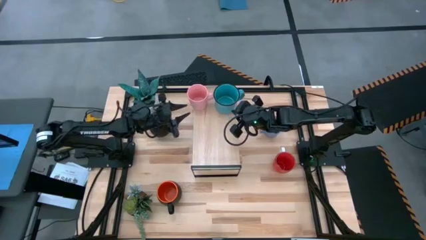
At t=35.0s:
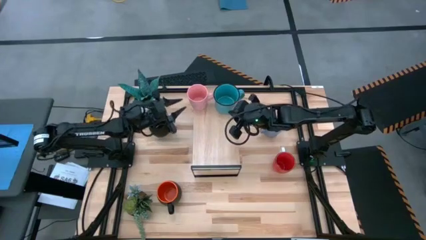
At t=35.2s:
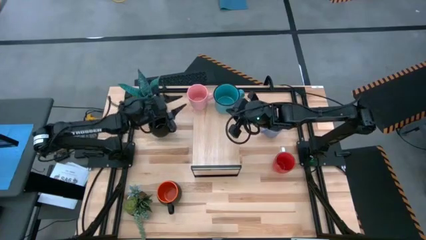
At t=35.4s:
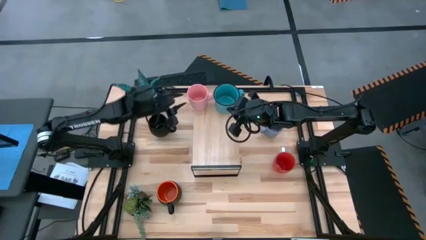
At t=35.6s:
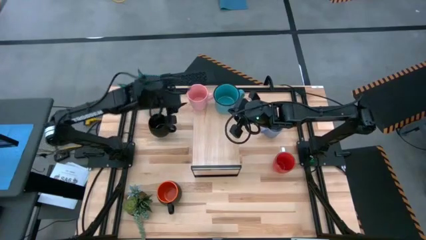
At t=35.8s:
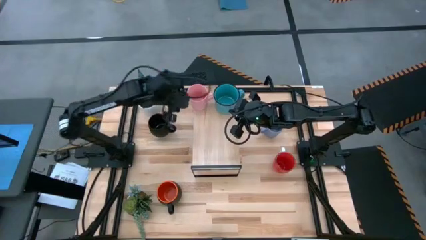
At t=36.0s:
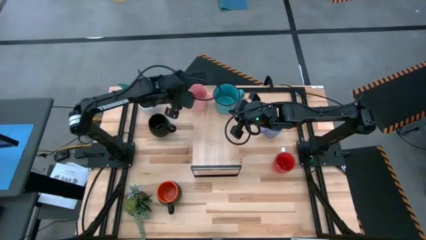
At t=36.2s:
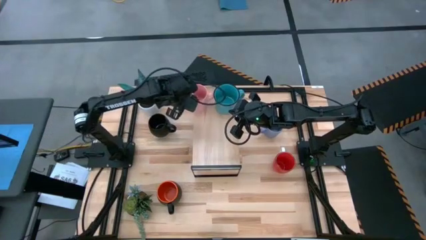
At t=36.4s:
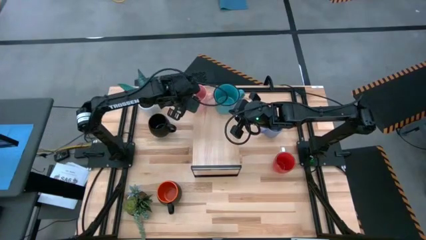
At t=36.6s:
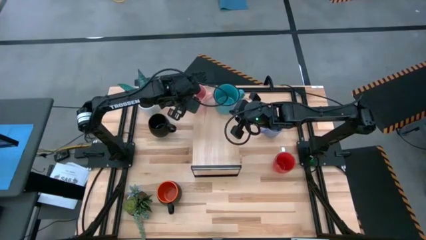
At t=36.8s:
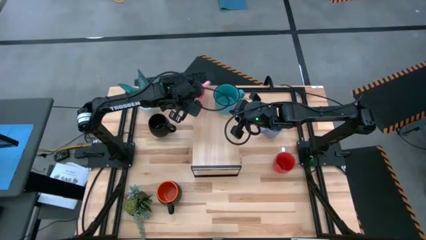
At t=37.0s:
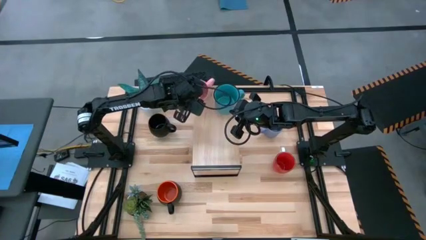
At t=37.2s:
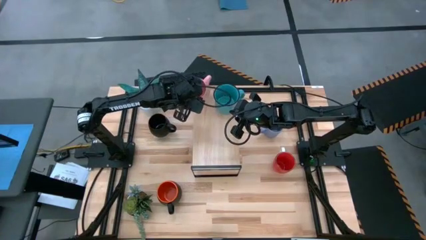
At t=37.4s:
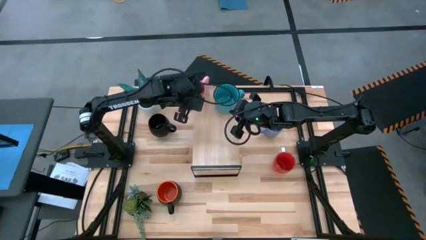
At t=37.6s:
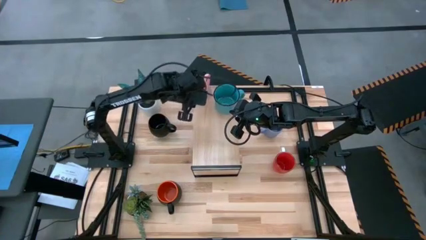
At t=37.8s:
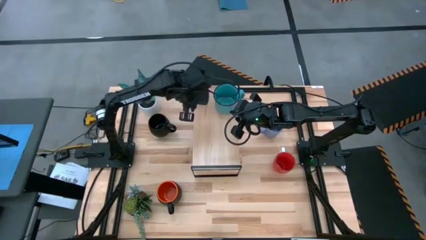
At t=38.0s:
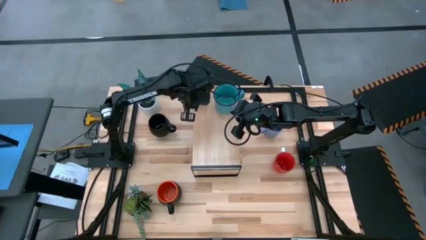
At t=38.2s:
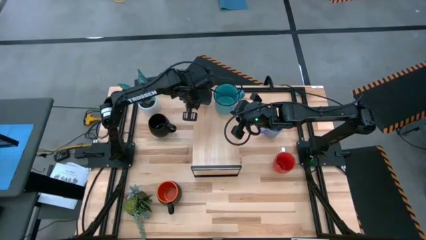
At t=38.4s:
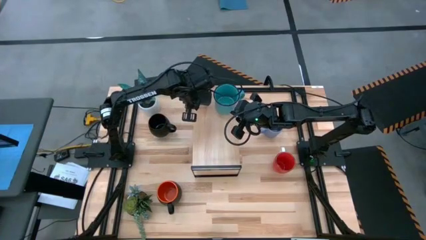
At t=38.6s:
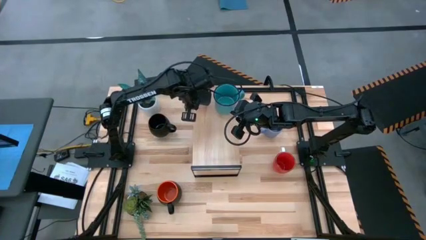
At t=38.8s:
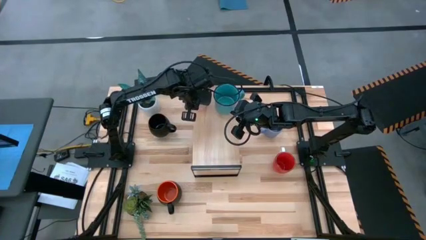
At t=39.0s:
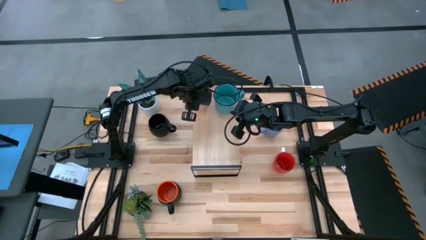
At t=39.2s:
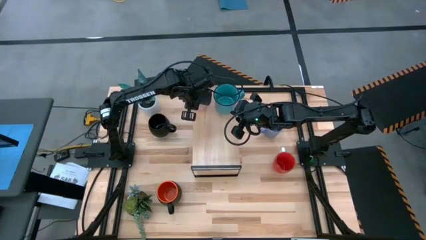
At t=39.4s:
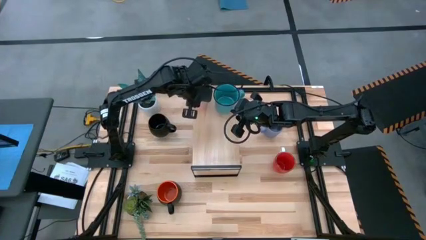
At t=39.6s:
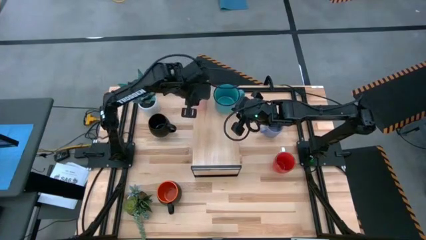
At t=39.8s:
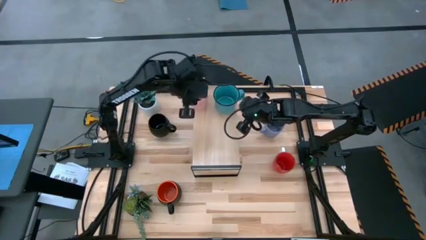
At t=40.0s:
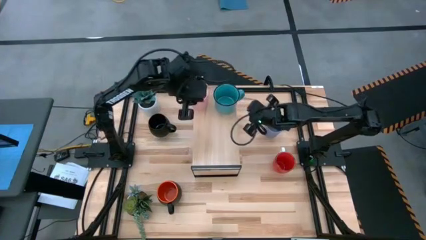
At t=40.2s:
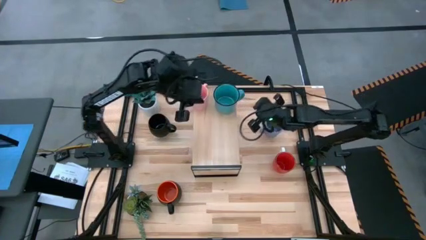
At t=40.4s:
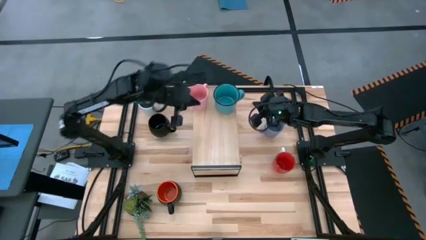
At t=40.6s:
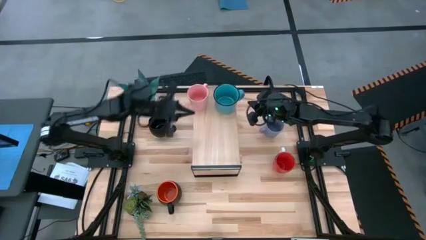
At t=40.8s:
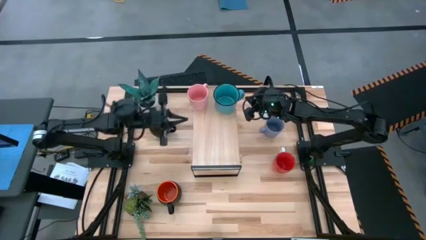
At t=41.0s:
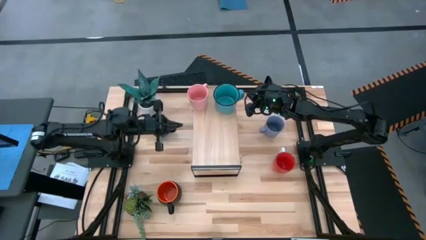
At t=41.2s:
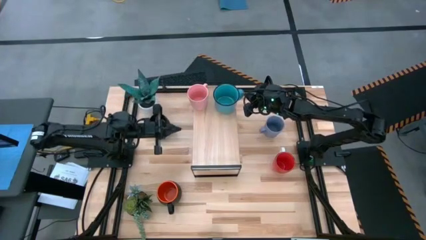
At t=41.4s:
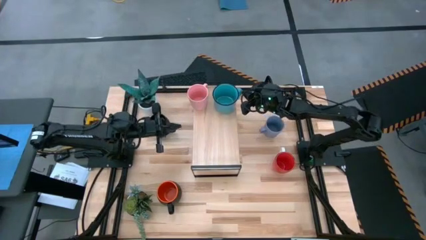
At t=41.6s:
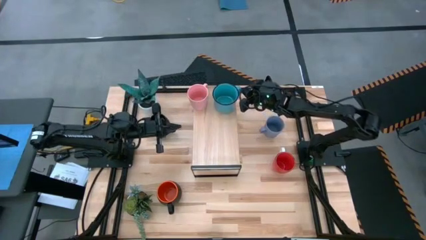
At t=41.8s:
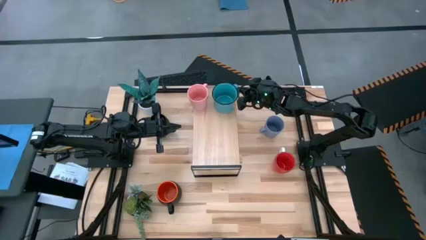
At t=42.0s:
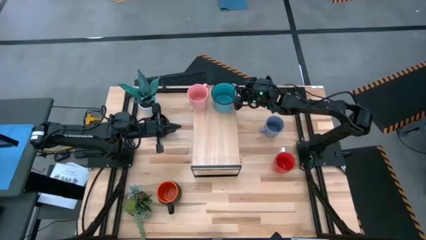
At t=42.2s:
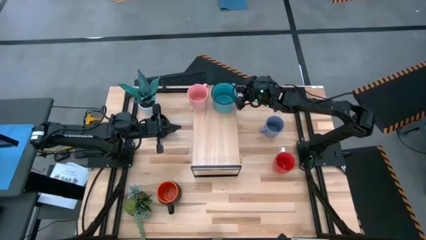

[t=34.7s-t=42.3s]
Task: Place coffee mugs
Adjust the mugs on the shelf

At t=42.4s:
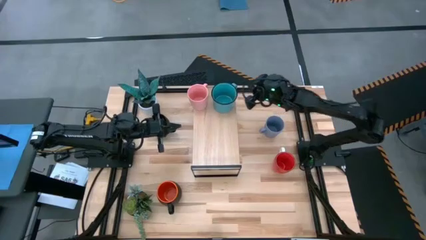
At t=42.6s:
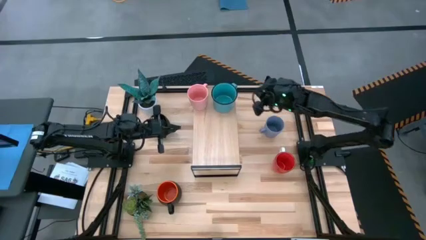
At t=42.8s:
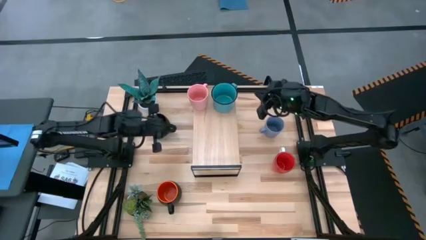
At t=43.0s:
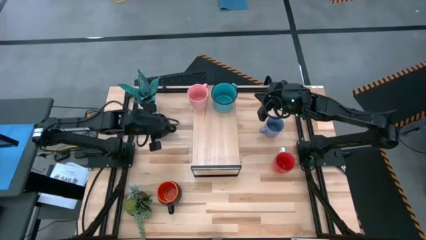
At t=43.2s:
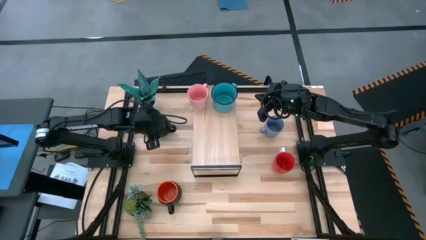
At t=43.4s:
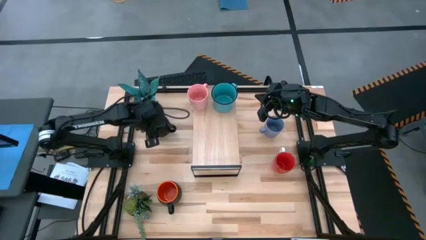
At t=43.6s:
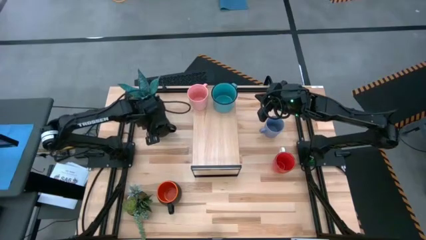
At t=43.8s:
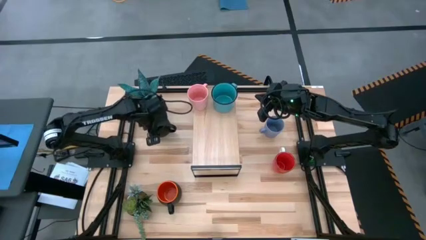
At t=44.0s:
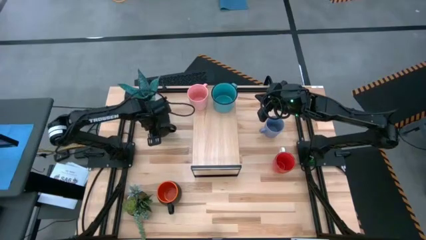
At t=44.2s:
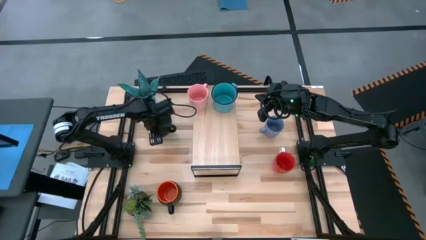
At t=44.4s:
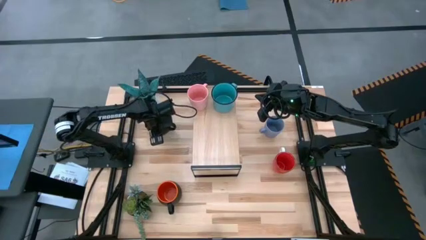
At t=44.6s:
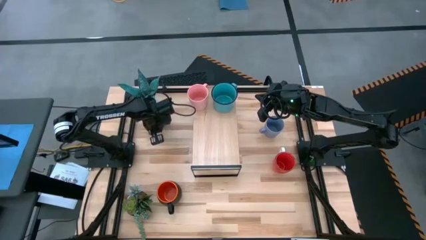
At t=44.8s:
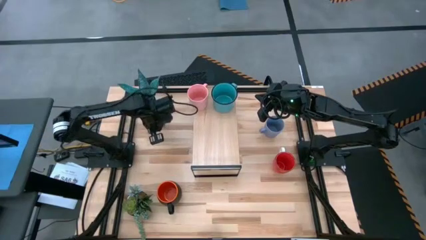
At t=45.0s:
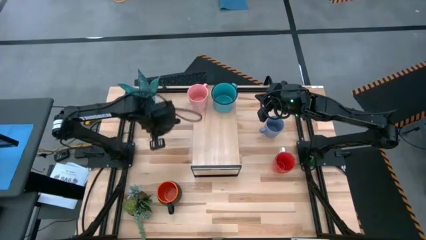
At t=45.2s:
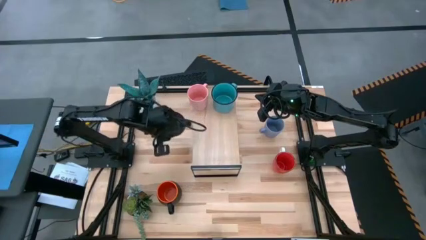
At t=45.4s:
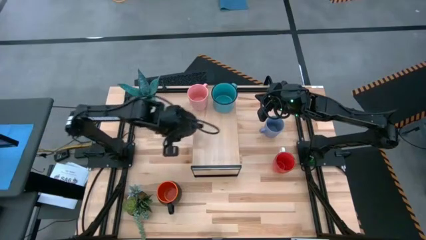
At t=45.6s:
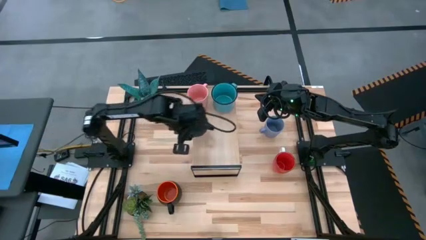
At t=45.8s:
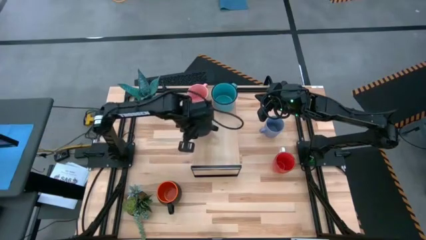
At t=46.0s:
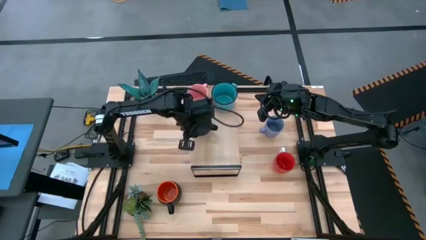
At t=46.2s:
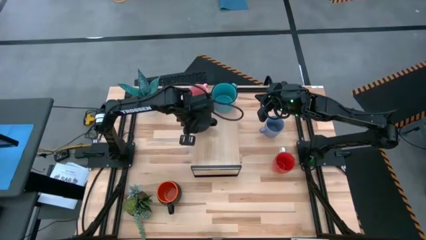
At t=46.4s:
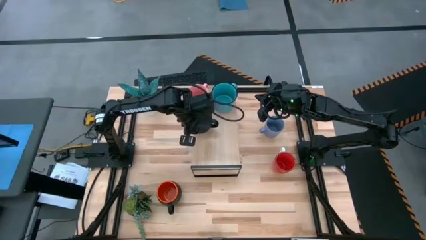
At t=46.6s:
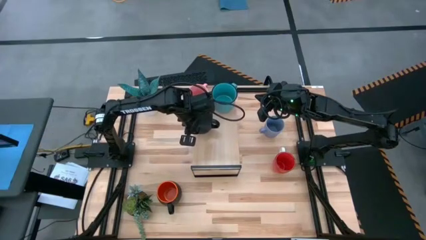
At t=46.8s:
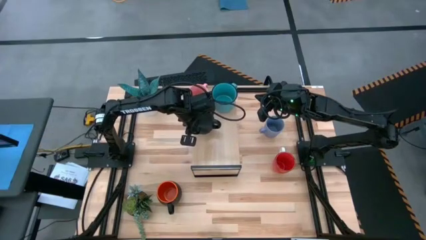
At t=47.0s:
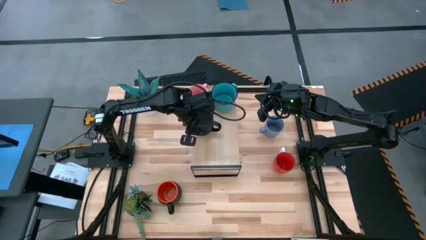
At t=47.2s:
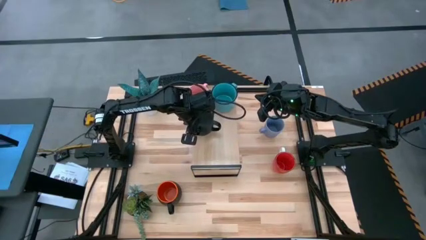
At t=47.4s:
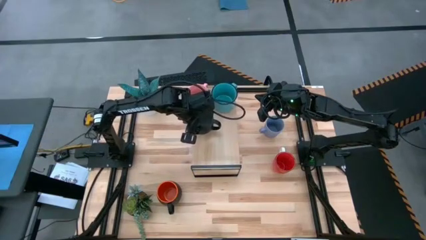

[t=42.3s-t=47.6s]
Put the black mug on the shelf

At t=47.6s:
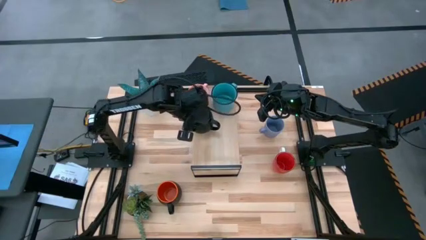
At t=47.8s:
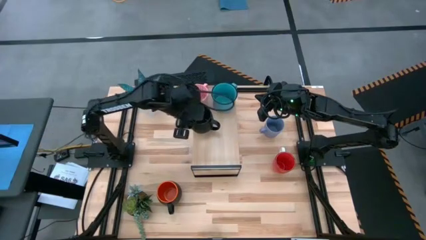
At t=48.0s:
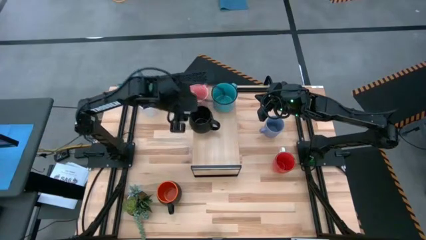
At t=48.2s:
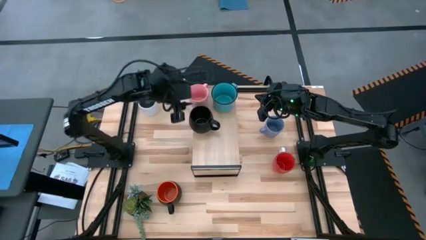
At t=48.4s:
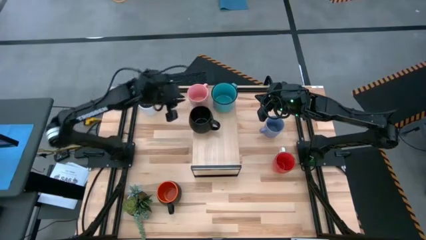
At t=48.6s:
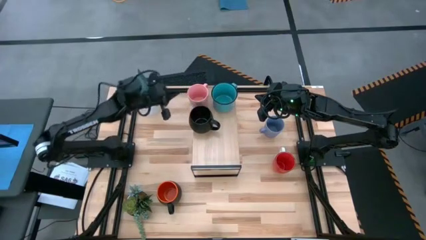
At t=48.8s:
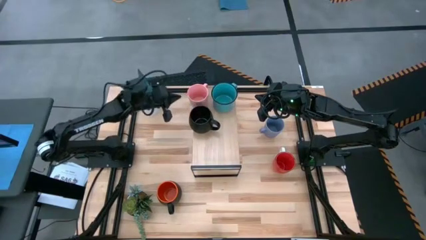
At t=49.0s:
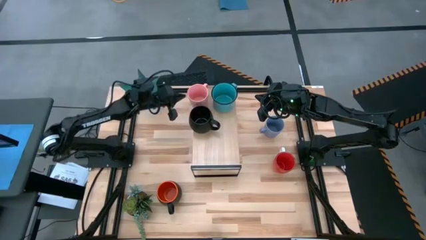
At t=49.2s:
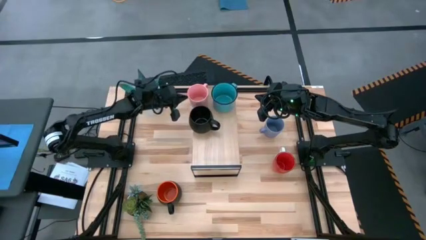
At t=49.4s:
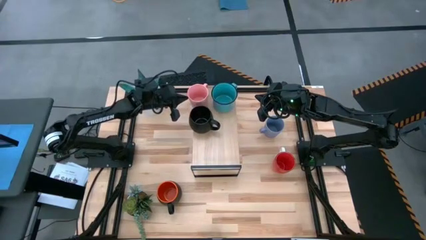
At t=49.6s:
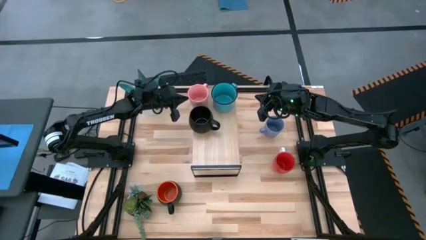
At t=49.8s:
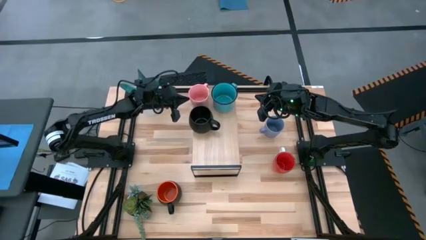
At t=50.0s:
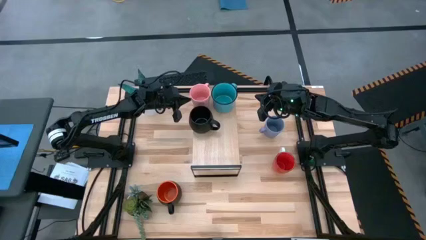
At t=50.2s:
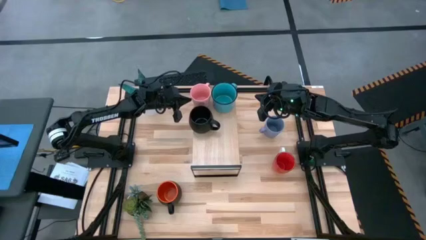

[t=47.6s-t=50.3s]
Adjust the pink mug on the shelf
